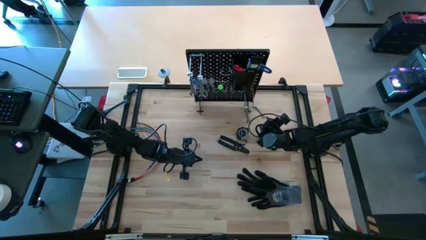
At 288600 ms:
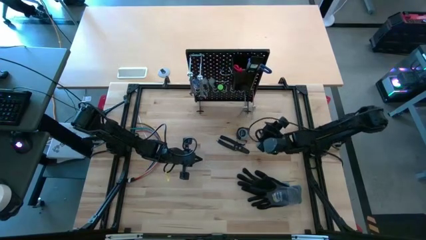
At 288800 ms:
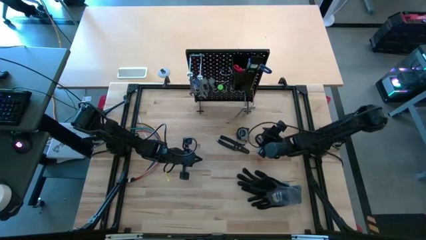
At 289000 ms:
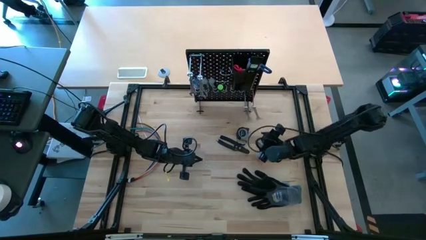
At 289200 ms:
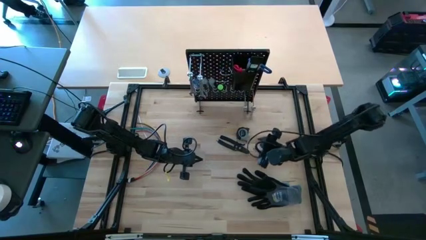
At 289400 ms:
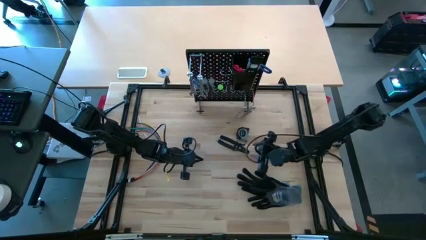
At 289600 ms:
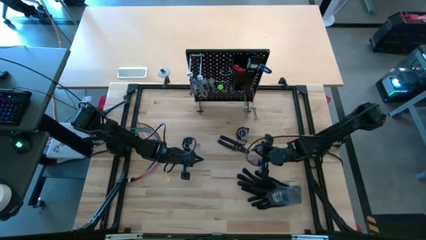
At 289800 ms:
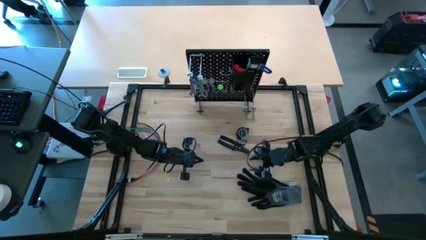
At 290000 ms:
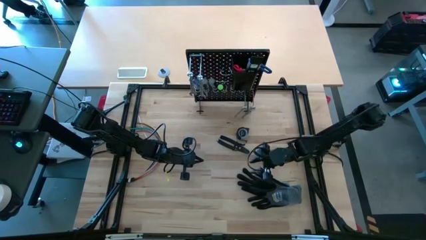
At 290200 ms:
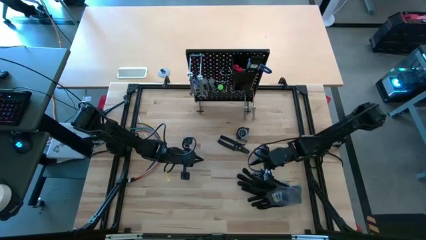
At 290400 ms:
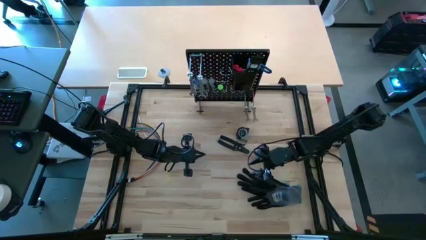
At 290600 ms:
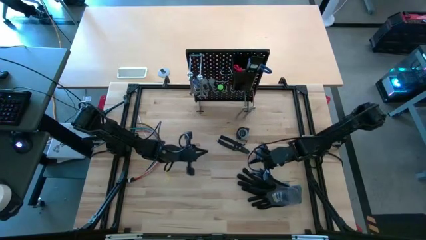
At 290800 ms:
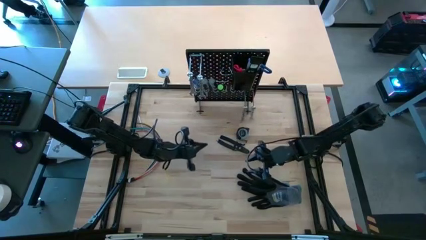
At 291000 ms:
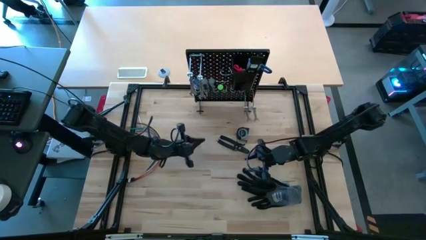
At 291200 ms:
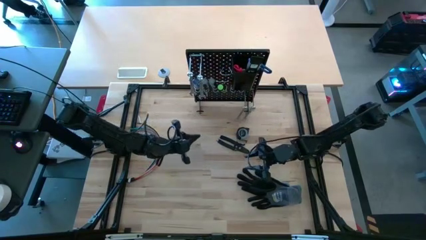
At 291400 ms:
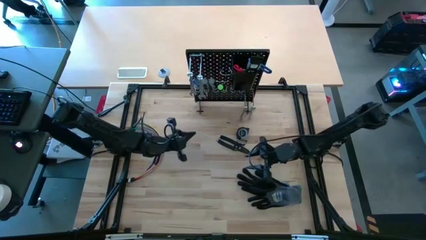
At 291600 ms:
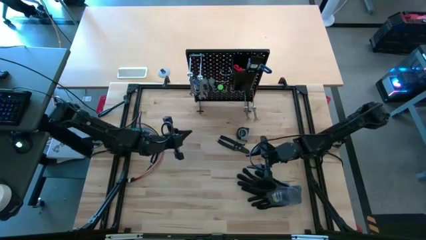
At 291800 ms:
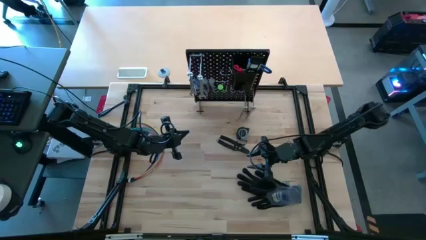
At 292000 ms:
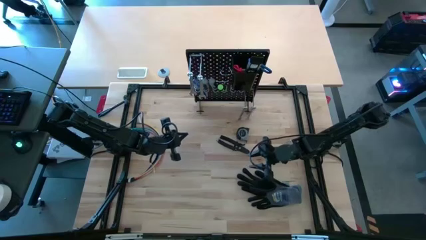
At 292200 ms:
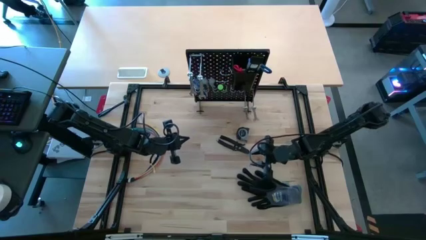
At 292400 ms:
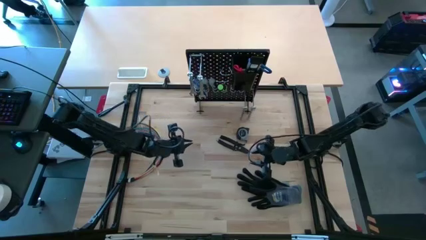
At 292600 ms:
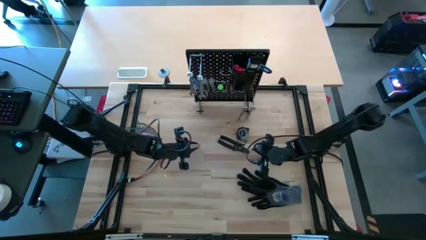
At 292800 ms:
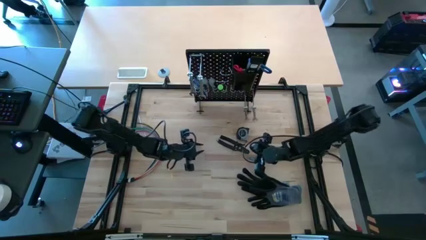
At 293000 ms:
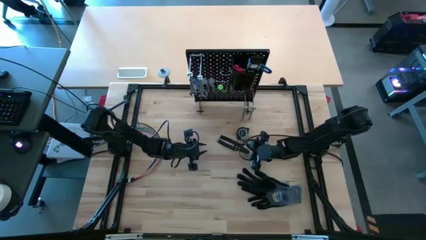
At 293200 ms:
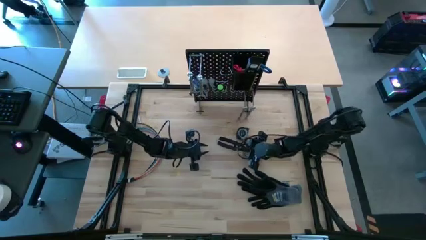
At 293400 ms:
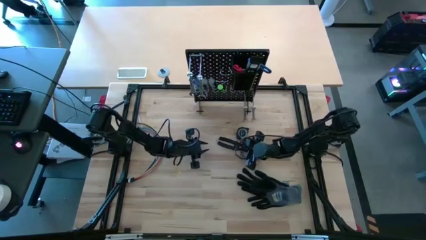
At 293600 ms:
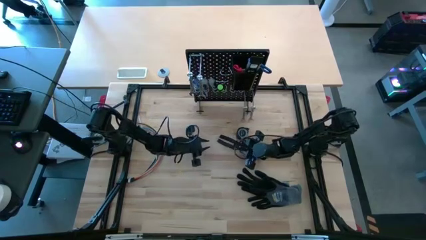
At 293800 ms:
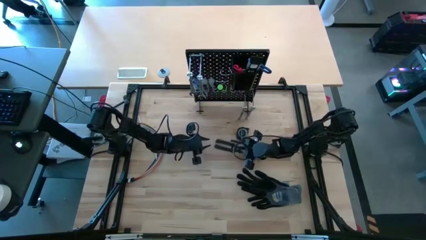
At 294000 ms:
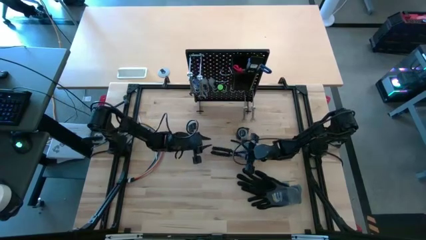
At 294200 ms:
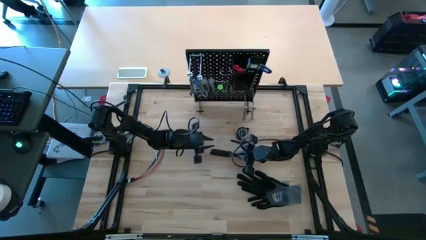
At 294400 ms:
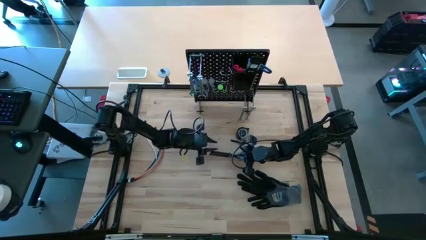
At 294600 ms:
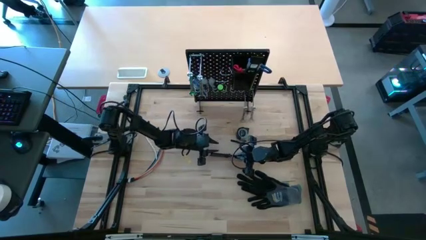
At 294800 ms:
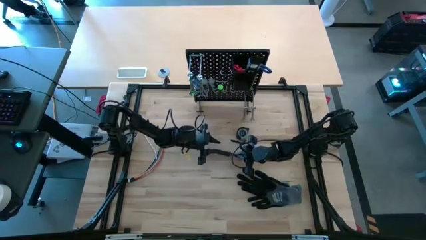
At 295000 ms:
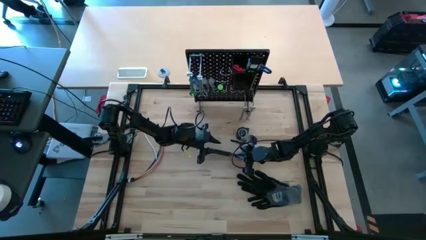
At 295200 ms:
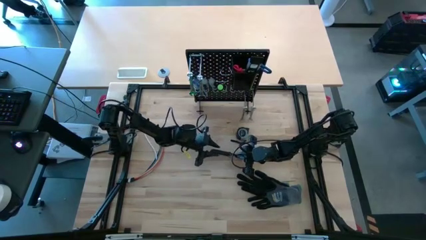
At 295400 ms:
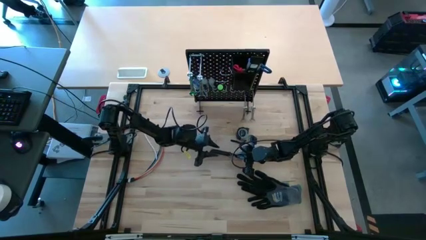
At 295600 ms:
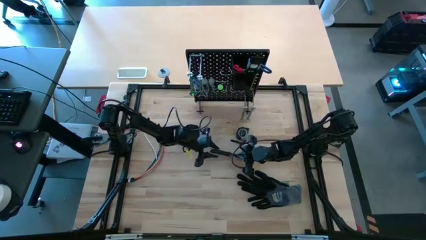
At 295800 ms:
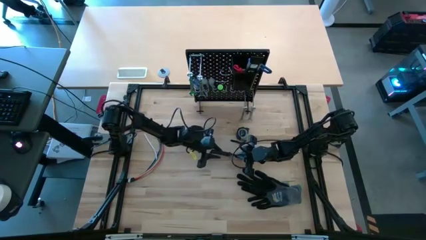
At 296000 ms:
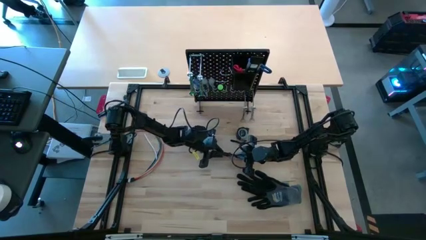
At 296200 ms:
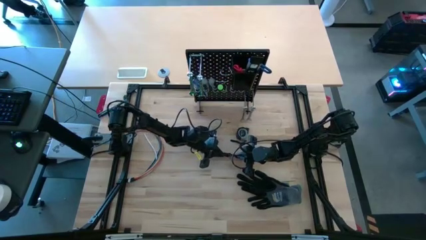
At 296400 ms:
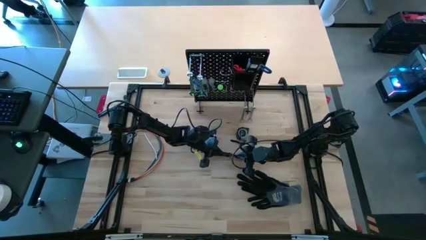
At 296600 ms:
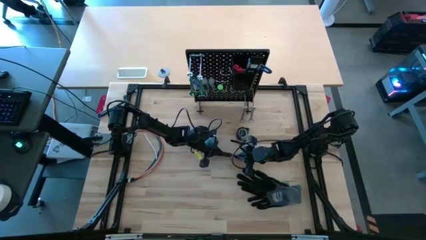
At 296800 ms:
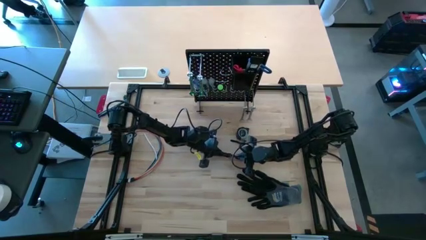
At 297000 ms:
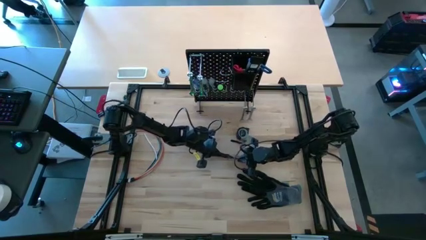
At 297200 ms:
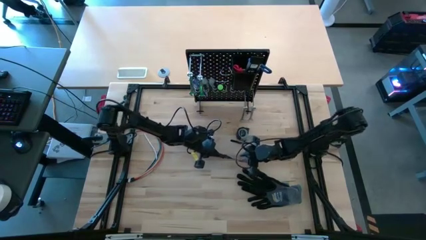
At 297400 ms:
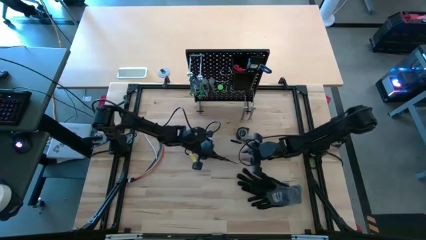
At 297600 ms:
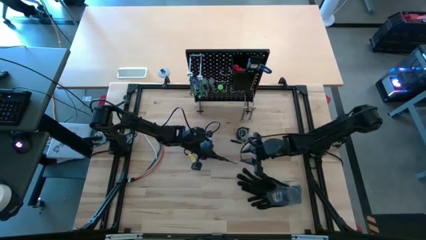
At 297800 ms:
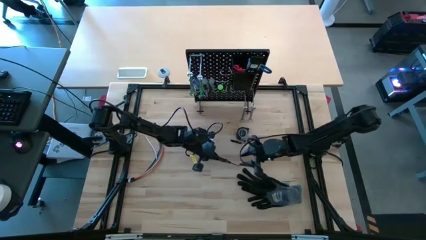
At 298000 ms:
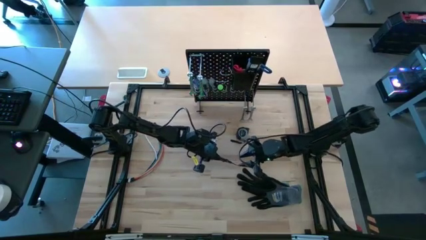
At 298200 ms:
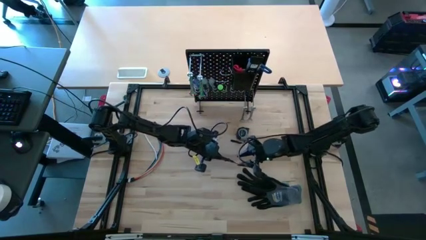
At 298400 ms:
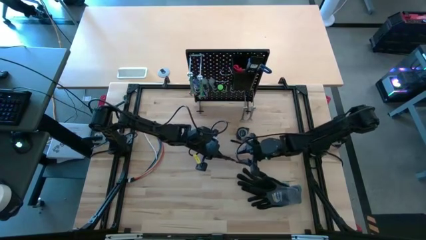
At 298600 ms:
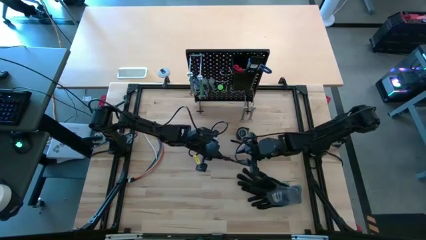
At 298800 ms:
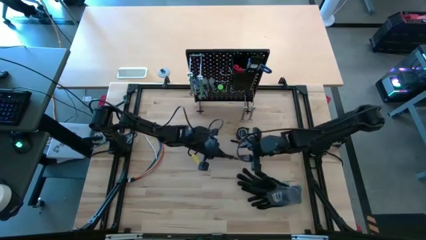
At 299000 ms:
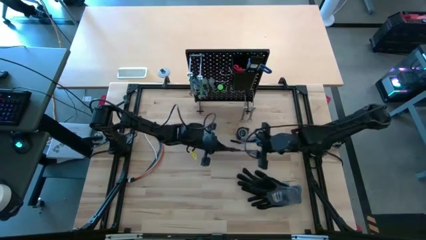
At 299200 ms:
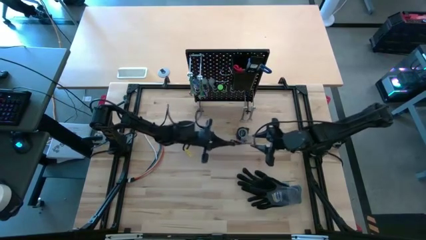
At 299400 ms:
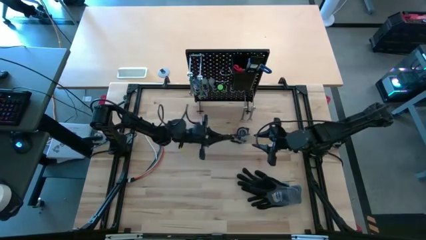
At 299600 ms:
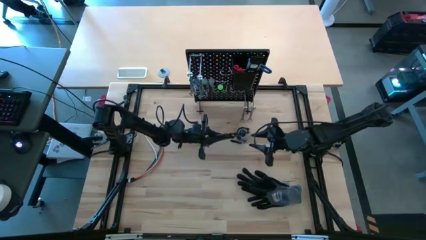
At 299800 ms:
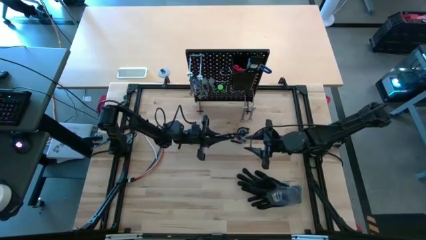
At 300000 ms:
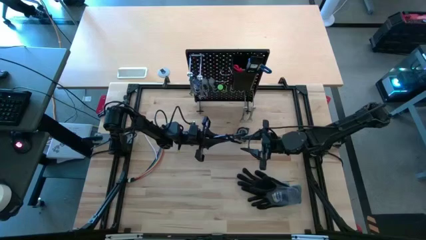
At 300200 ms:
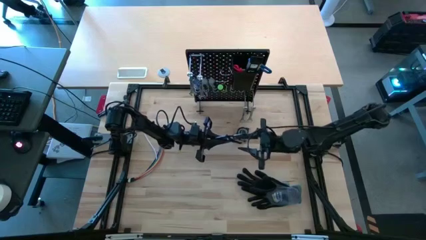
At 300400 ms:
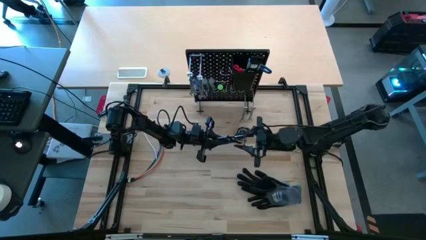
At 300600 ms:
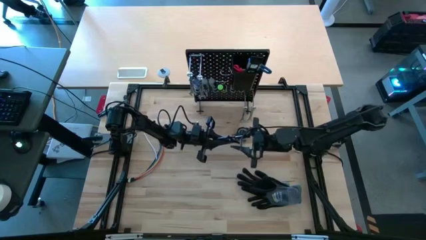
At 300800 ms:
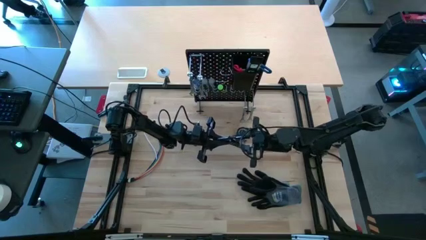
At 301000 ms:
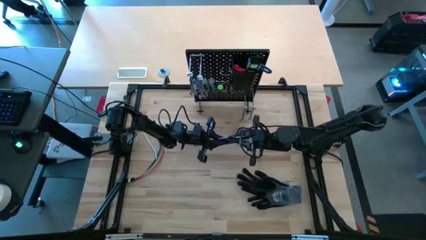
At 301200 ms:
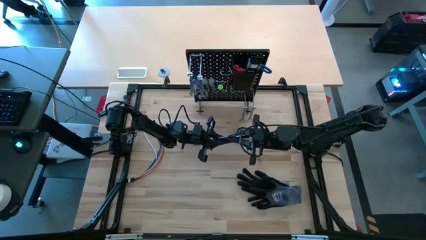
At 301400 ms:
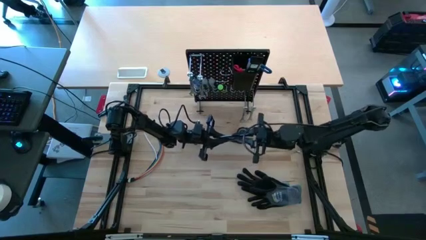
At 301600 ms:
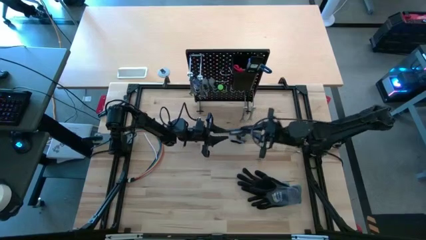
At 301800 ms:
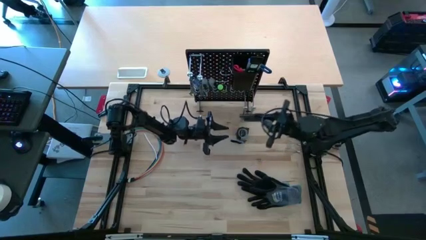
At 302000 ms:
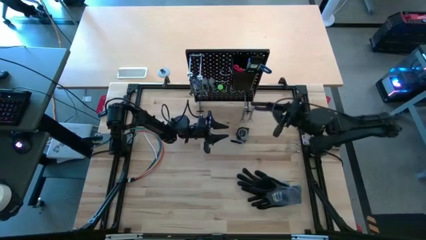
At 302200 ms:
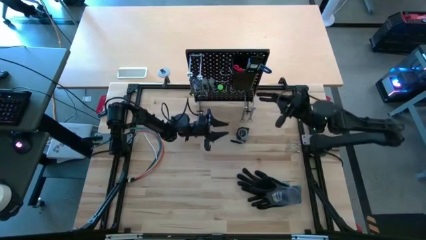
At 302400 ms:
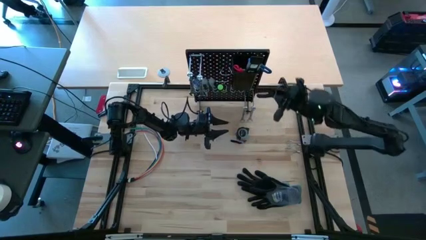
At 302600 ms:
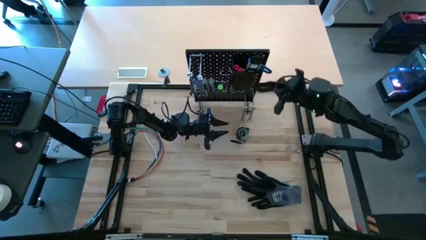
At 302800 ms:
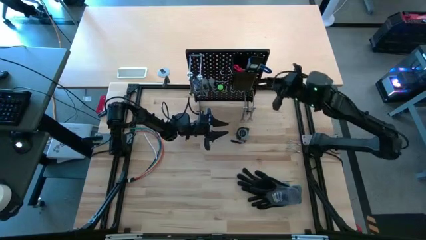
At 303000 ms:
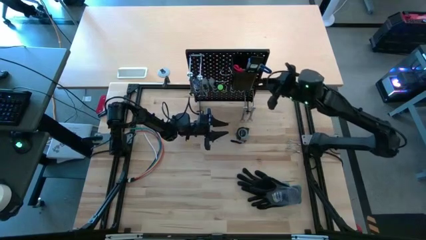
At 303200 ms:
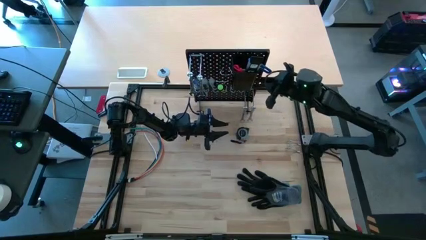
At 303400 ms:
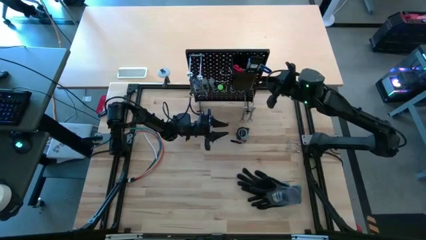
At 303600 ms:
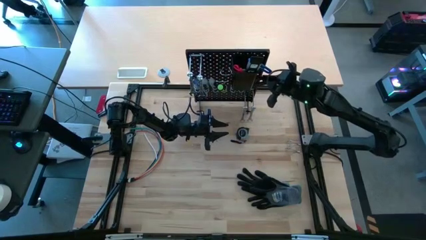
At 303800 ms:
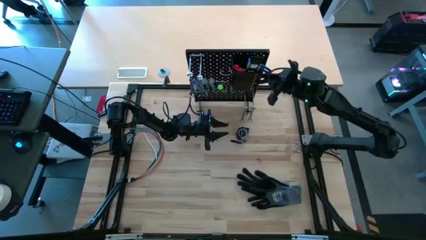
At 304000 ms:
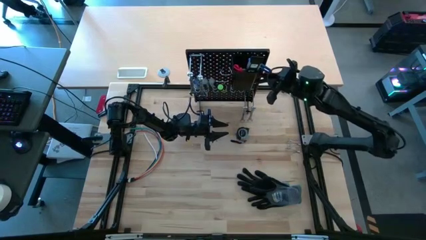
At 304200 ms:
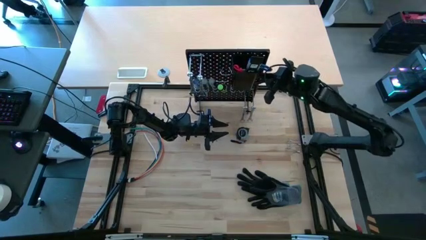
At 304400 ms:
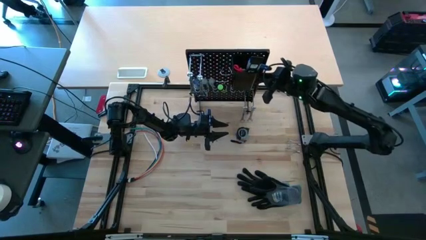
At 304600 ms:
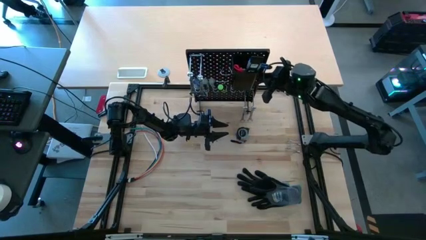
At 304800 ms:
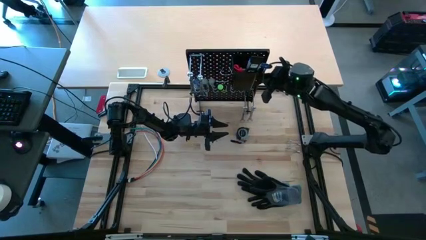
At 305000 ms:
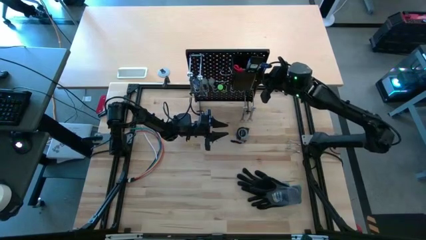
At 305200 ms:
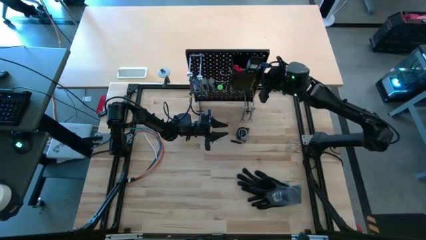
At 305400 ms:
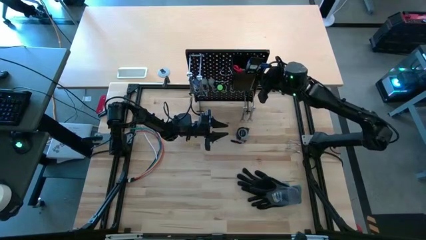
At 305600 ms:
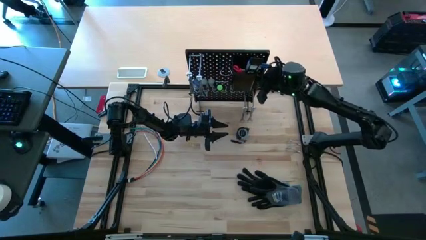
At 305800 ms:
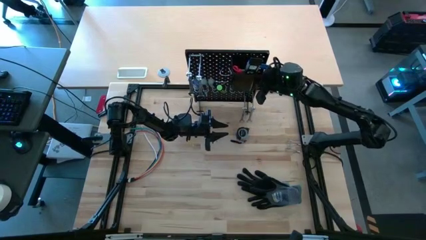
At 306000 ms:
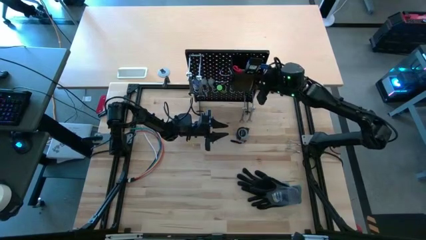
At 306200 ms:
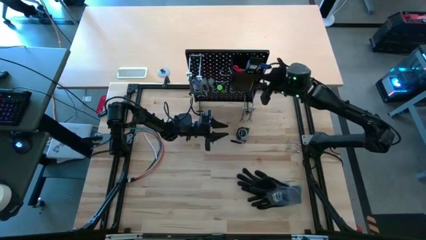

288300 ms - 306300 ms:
Task: Hang tools onto peg board
Hang the black tube cutters on the peg board
